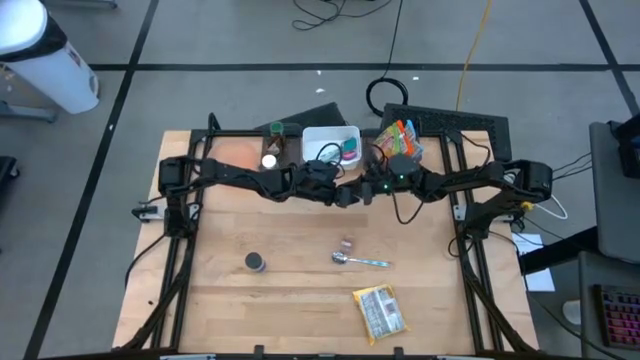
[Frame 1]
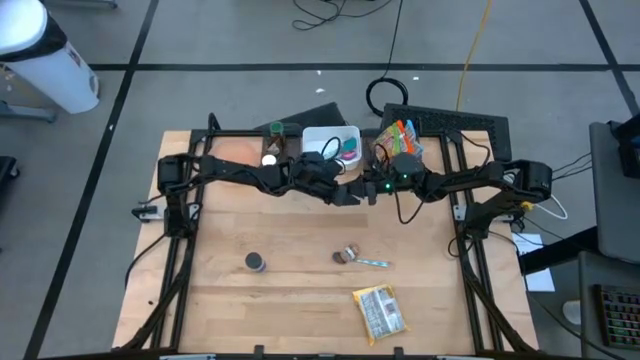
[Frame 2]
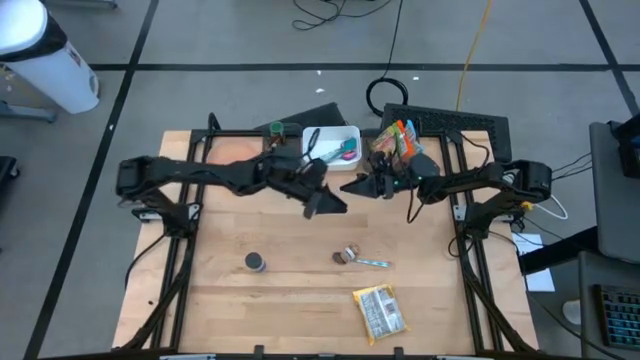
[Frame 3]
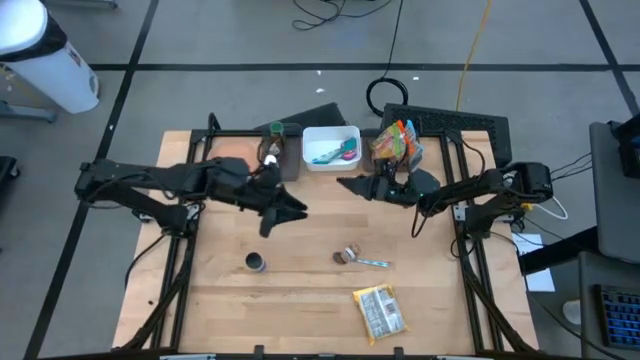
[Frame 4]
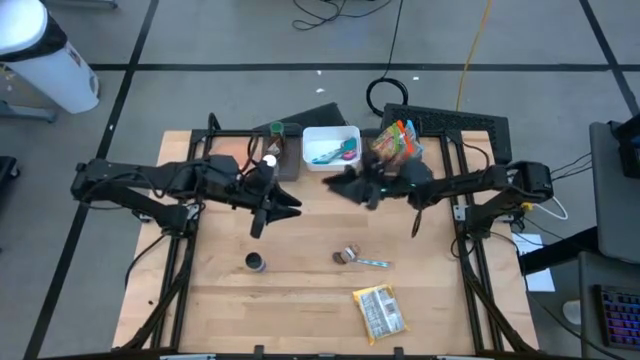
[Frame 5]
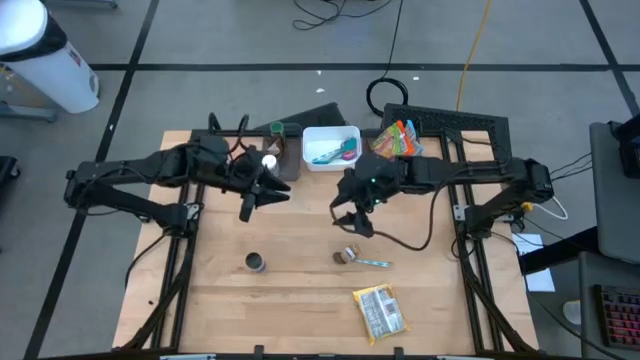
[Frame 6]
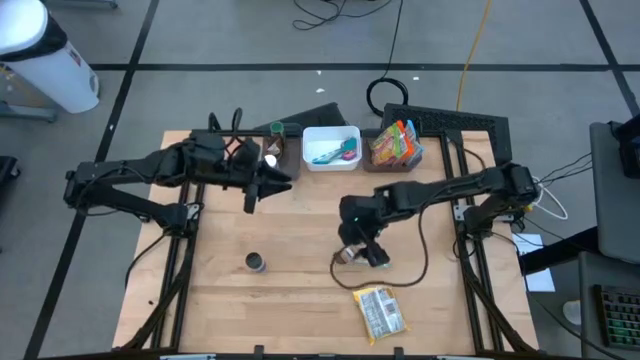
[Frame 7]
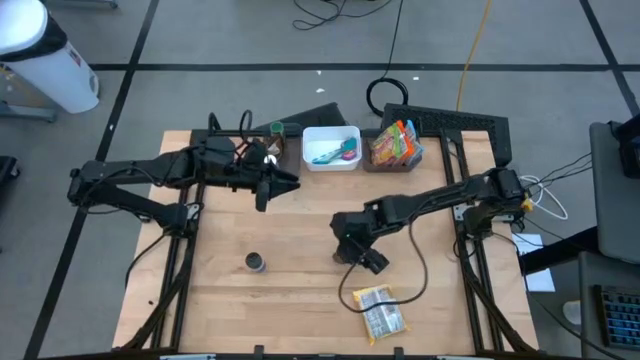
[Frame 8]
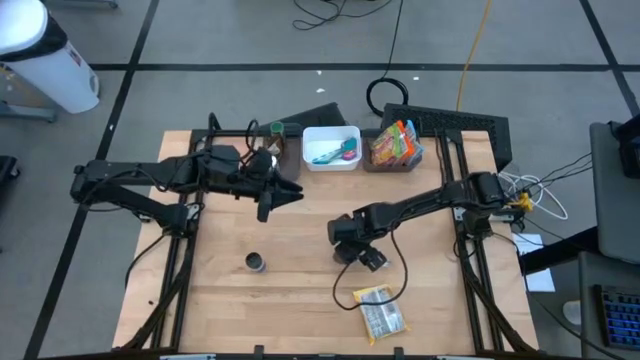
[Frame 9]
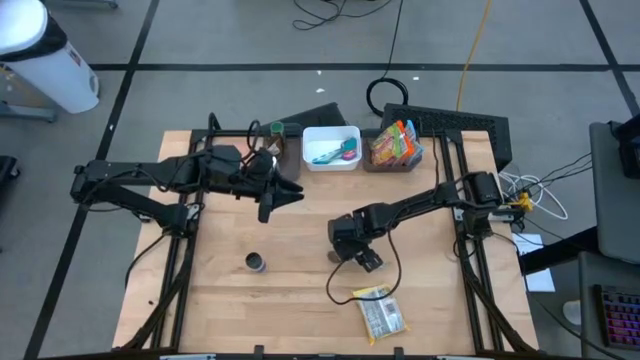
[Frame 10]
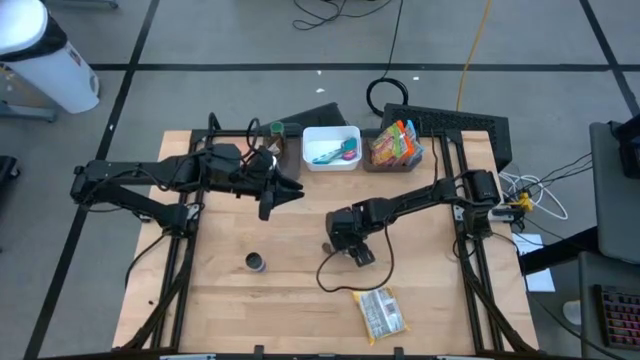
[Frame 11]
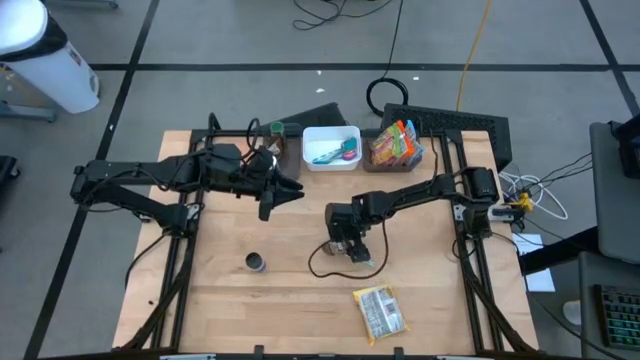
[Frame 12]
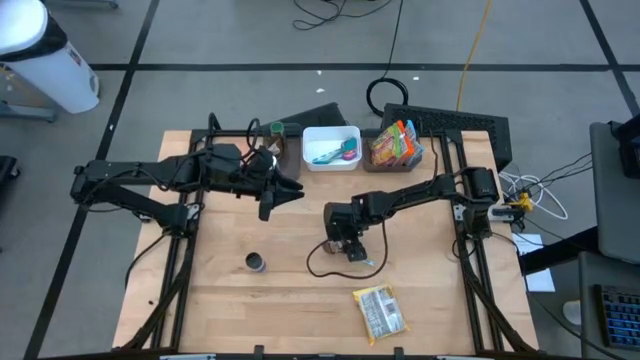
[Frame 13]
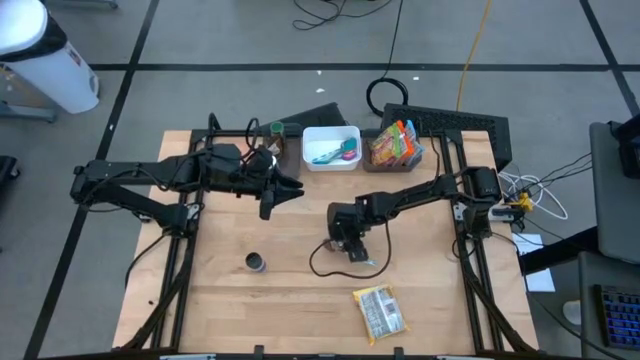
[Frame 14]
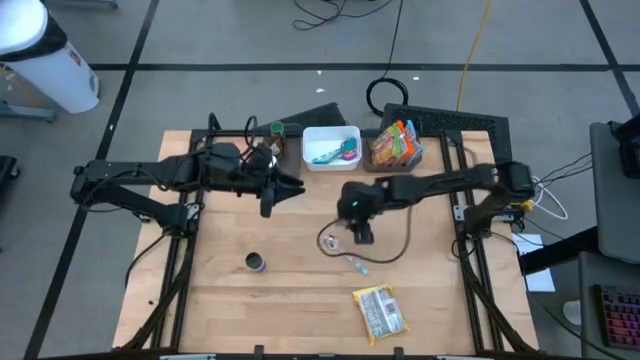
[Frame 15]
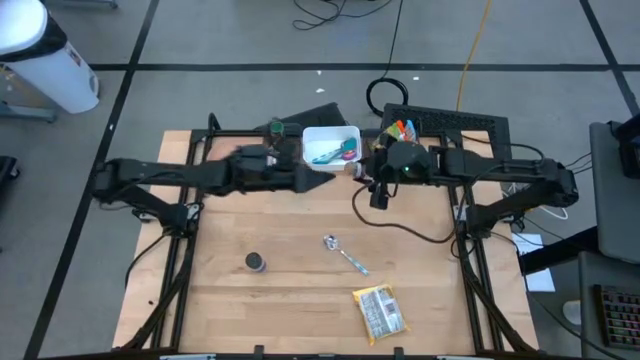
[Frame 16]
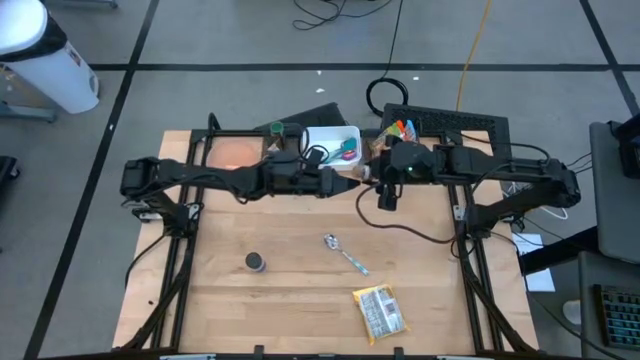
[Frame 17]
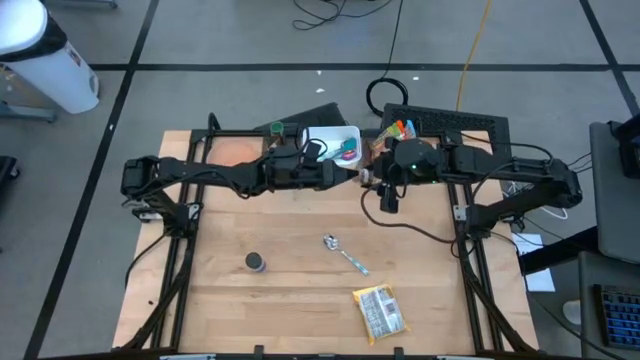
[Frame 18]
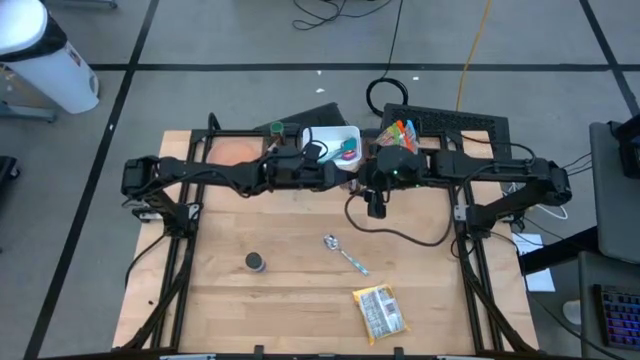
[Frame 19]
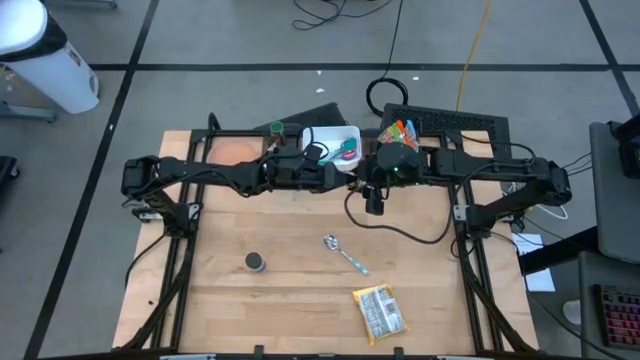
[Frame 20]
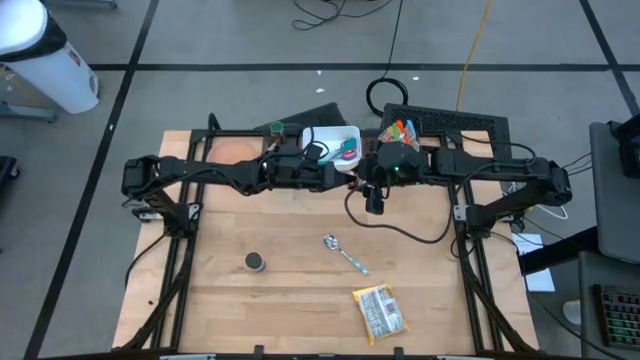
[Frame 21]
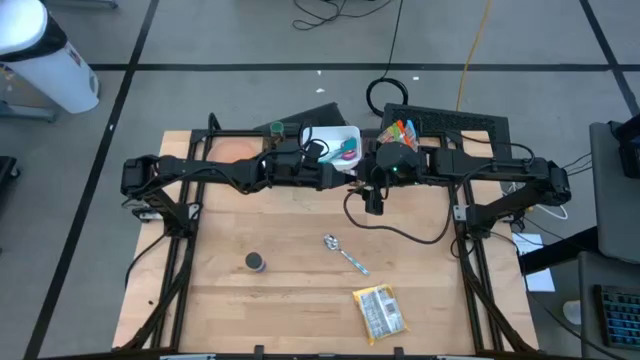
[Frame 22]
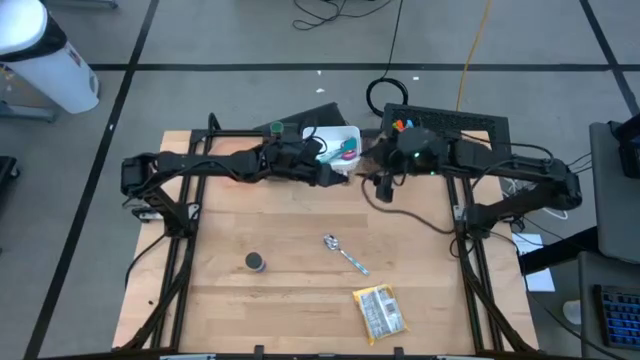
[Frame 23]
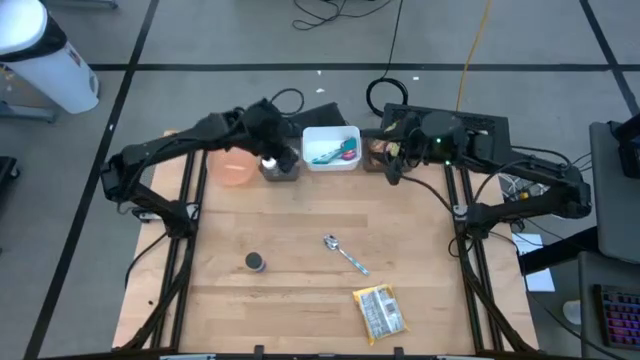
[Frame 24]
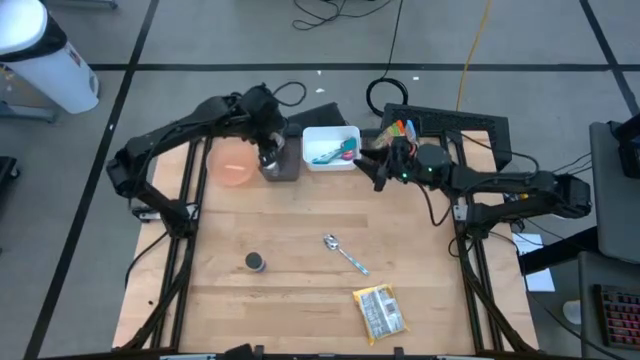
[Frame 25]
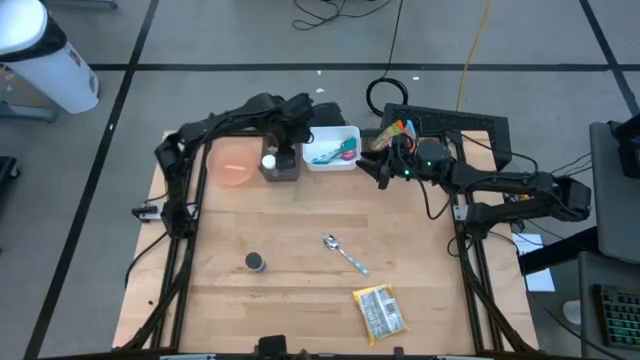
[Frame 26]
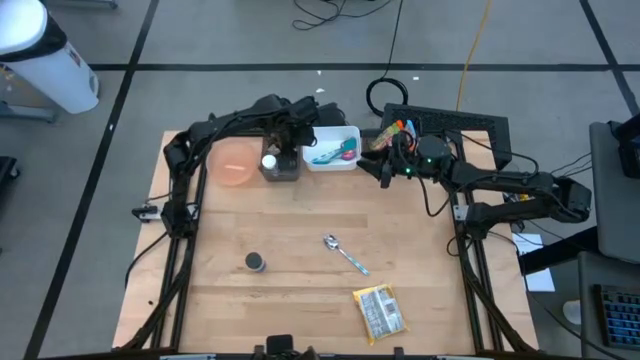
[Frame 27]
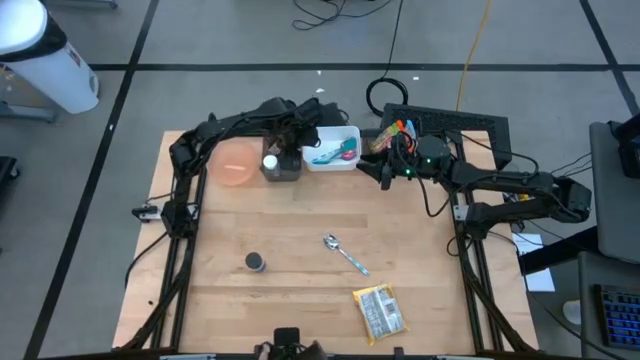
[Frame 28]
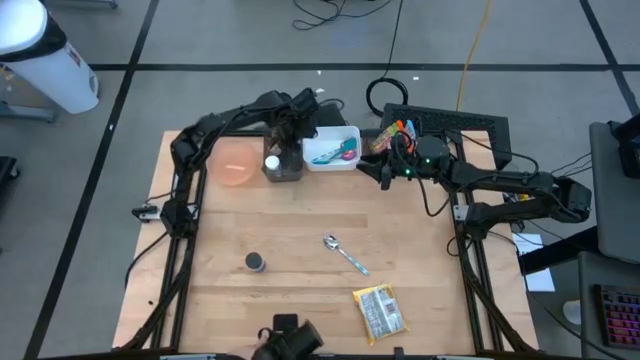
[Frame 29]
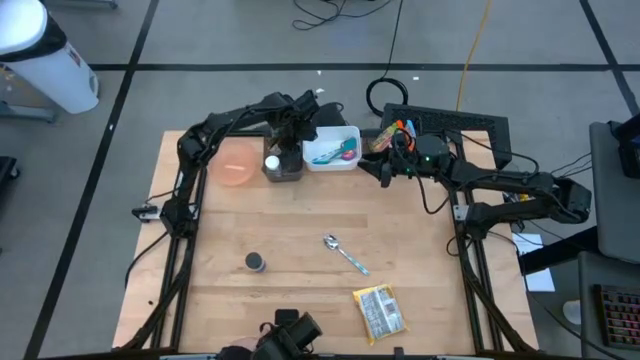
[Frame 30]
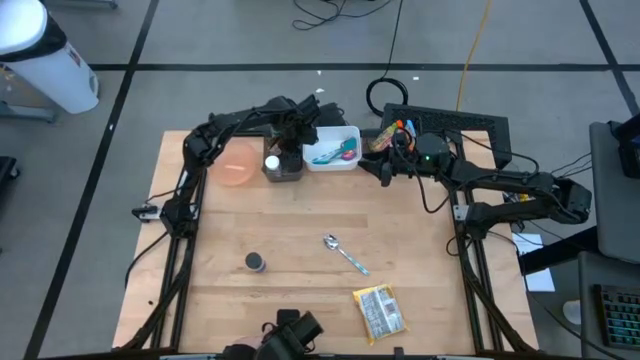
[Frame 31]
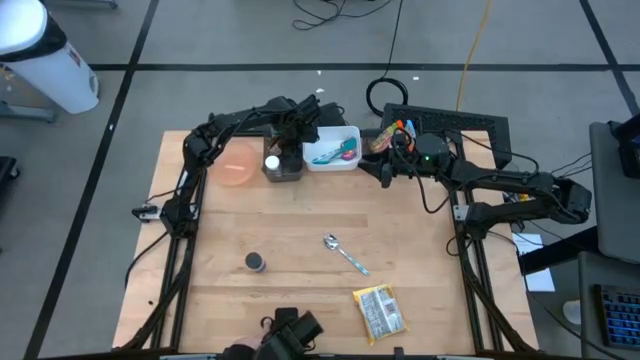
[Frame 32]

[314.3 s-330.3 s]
Task: Pick & Place Food Item
Put the brown seasoning bottle into the left black bin
